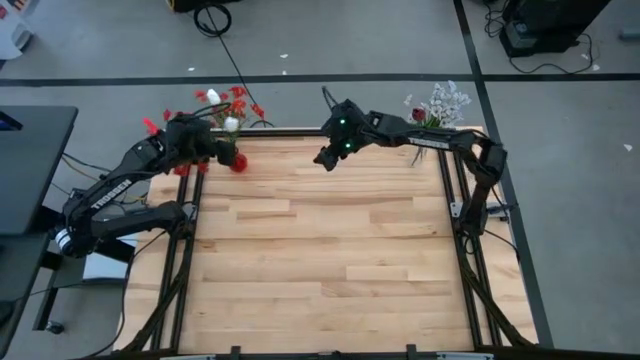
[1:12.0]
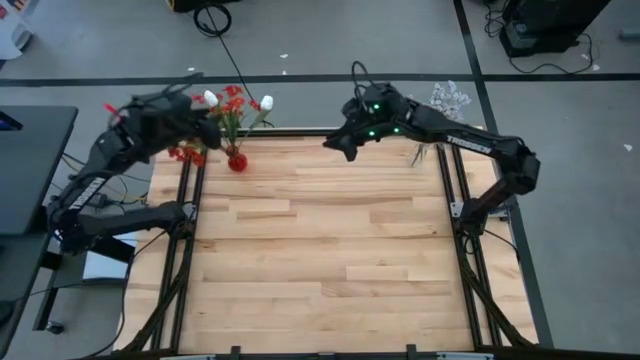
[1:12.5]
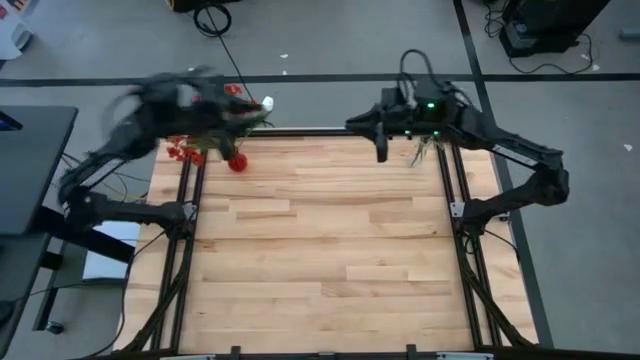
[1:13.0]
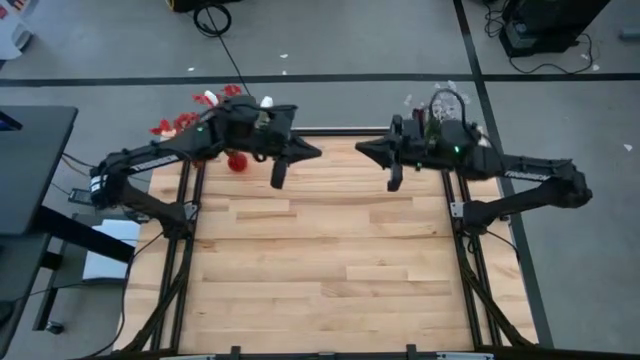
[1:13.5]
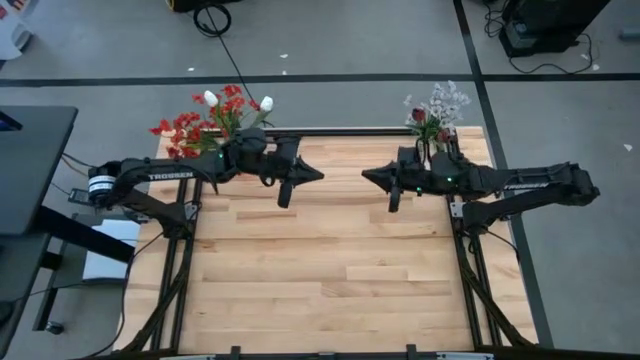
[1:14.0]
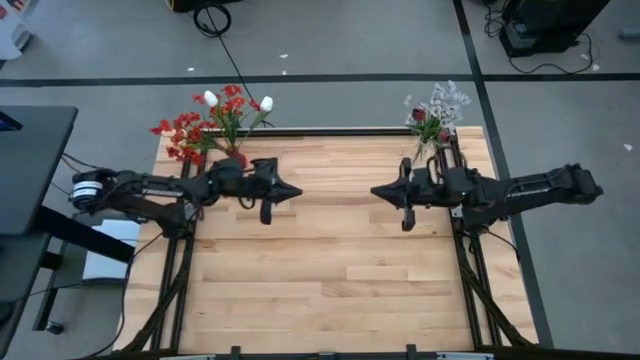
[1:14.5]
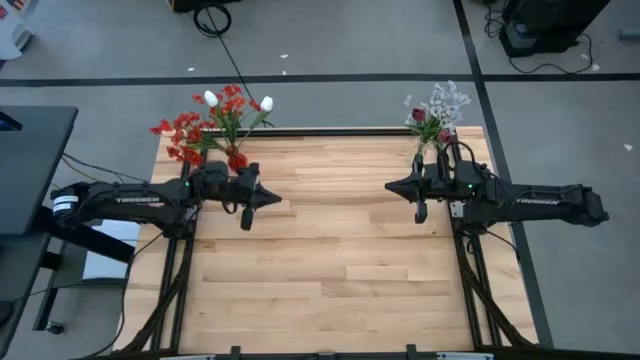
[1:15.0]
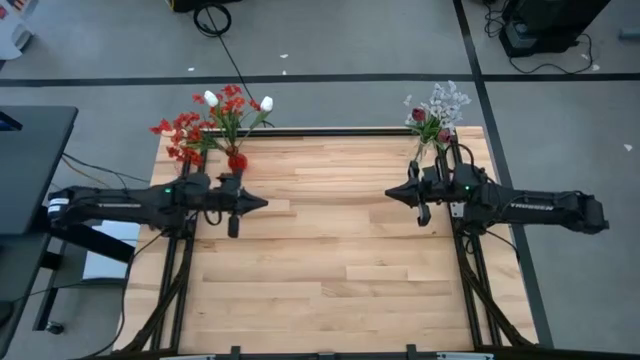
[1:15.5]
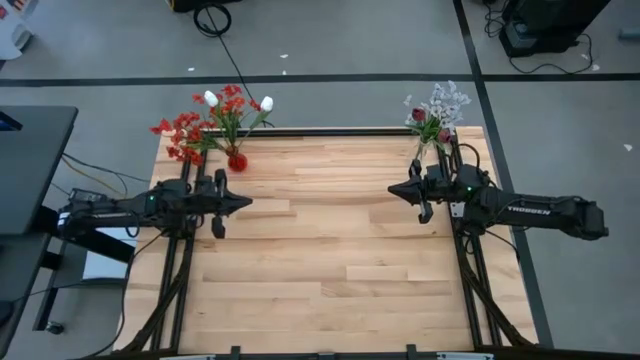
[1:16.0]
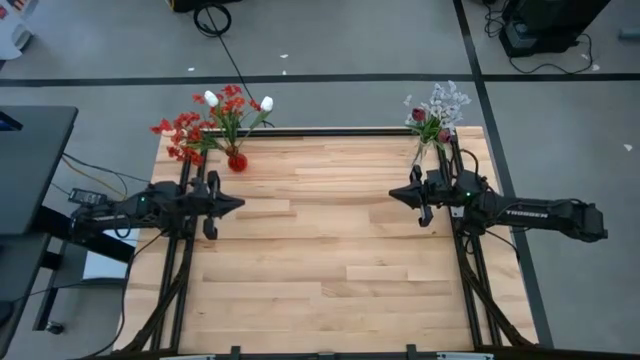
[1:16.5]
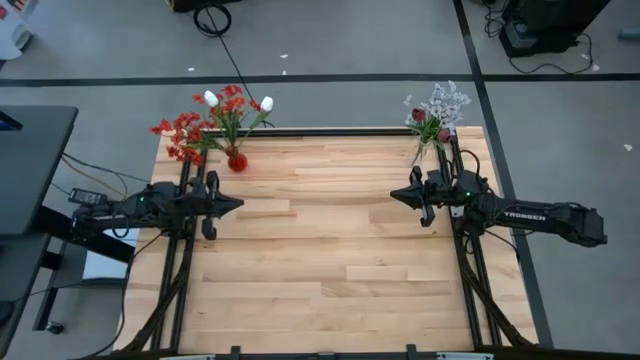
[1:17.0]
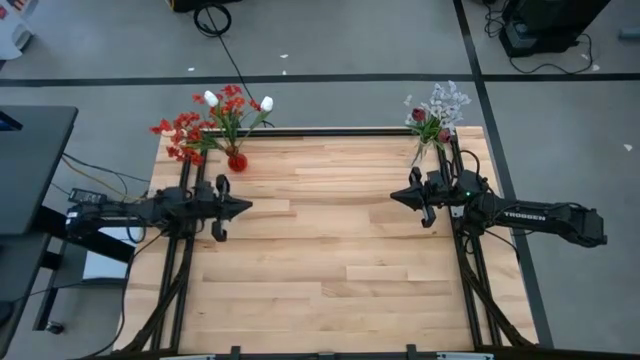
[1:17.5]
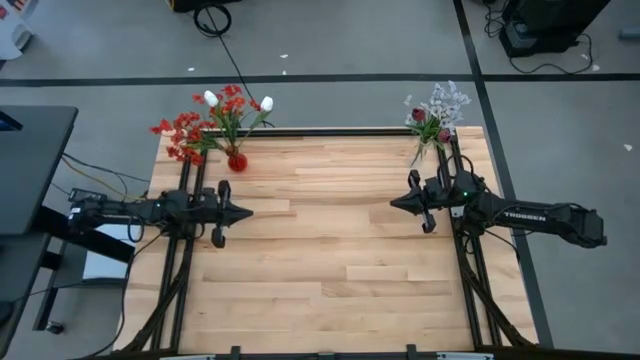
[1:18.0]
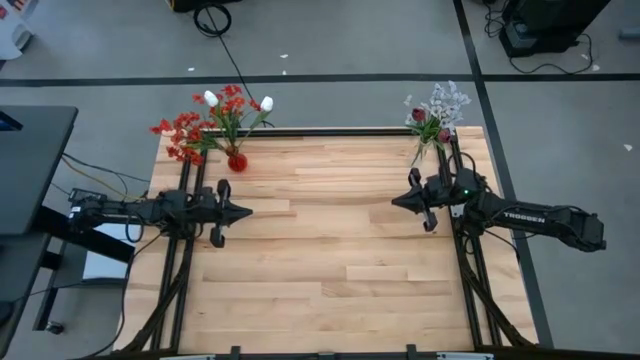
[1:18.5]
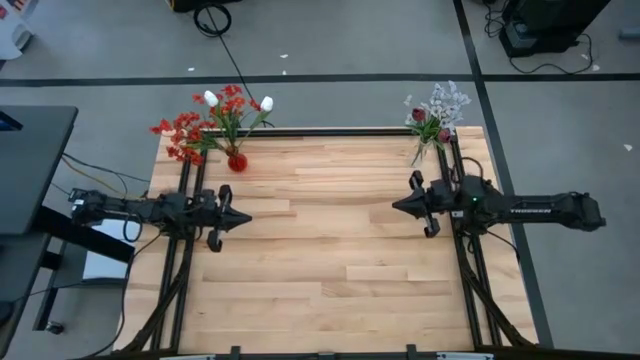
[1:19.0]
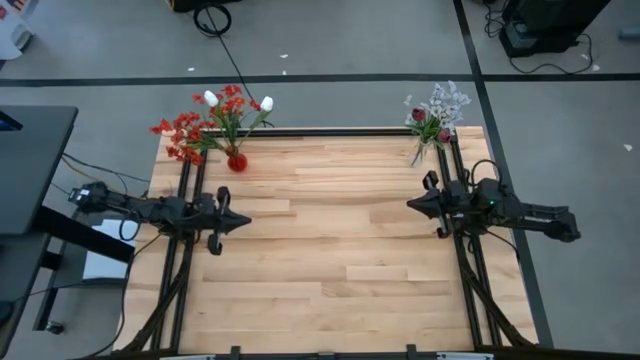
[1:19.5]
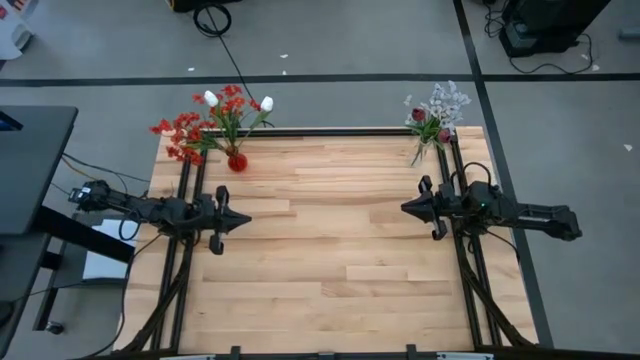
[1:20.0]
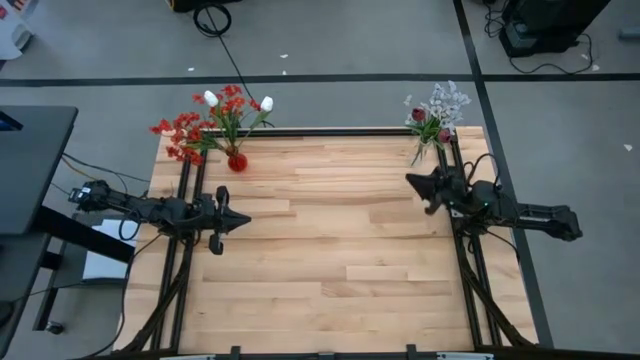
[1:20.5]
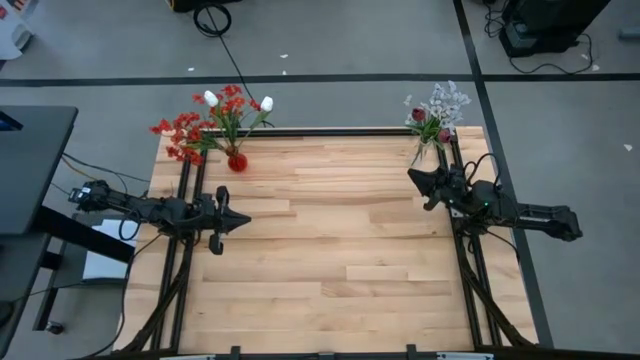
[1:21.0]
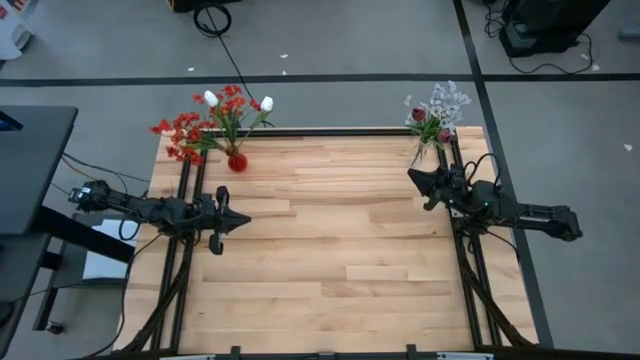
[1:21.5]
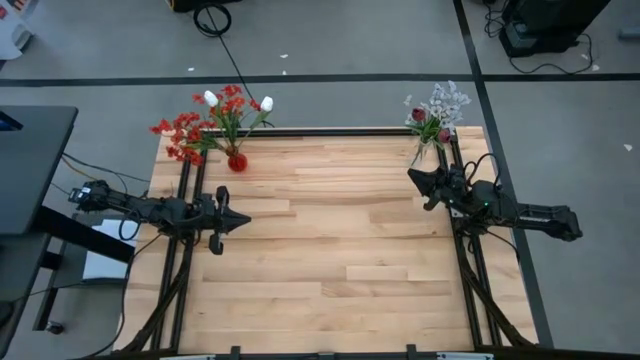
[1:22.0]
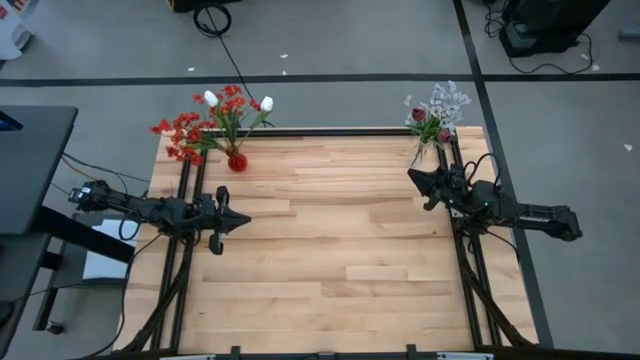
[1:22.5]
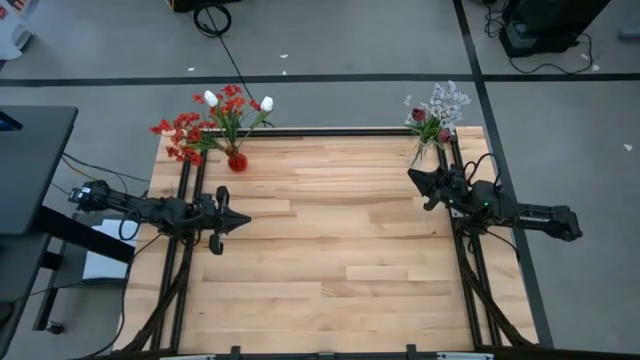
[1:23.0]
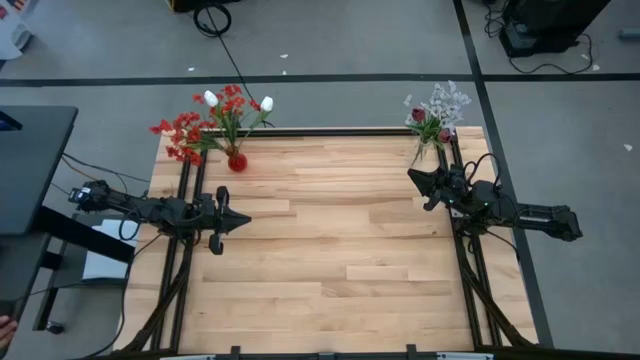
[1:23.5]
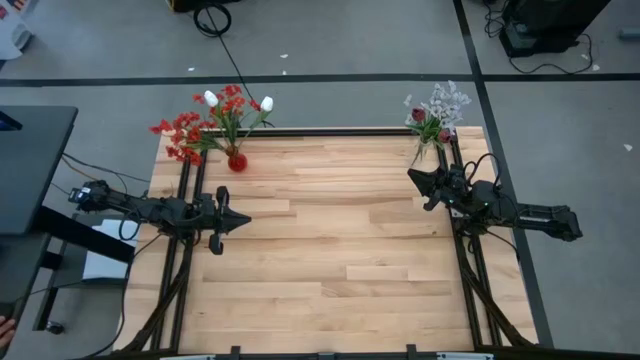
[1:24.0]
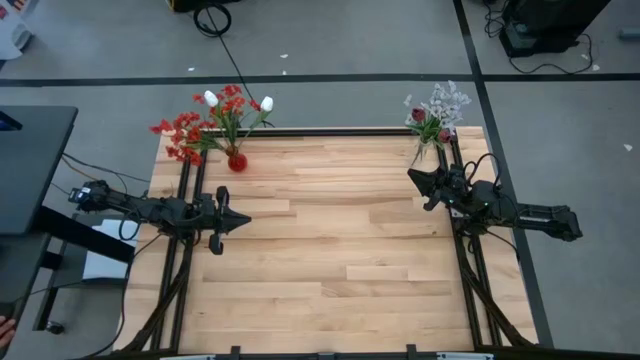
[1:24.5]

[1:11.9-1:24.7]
Task: Sort flowers into vase by color
Return to Home Position

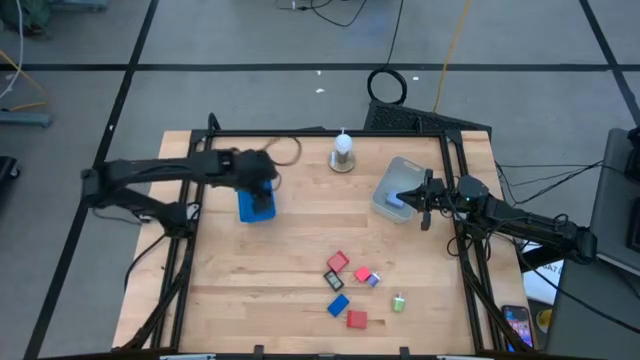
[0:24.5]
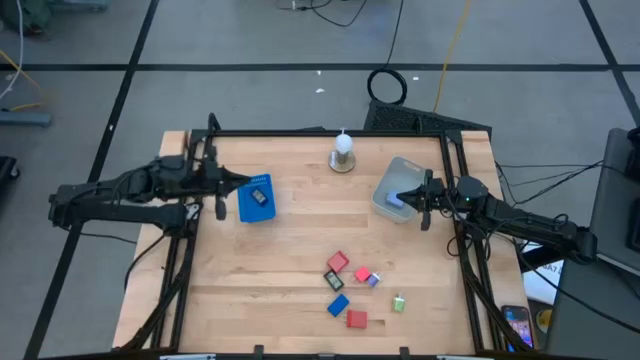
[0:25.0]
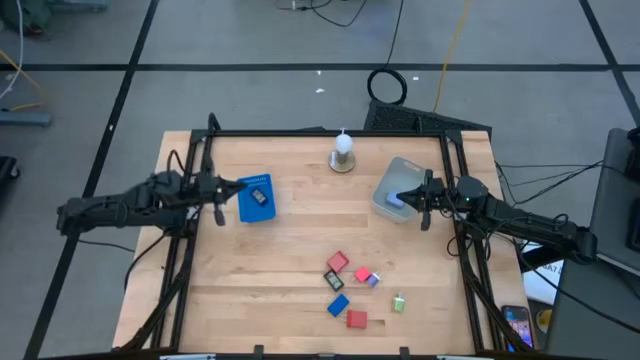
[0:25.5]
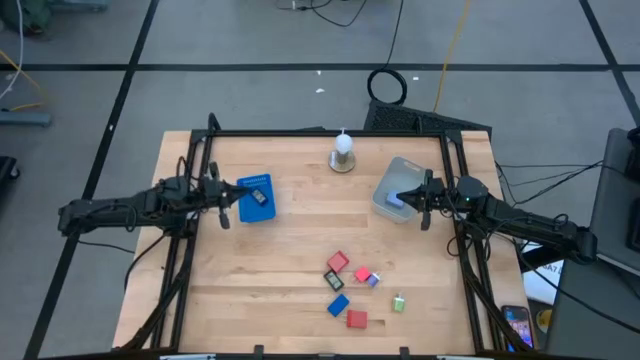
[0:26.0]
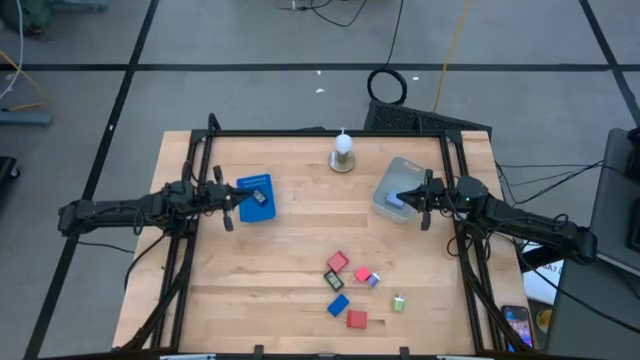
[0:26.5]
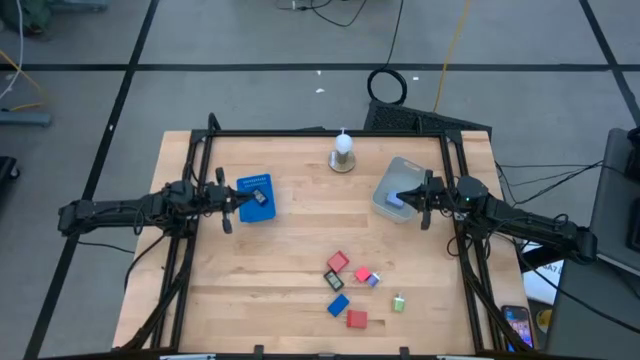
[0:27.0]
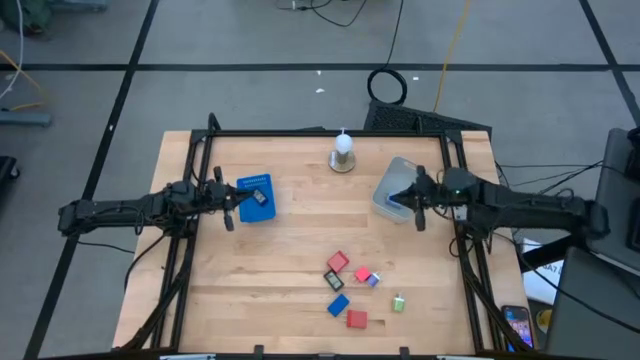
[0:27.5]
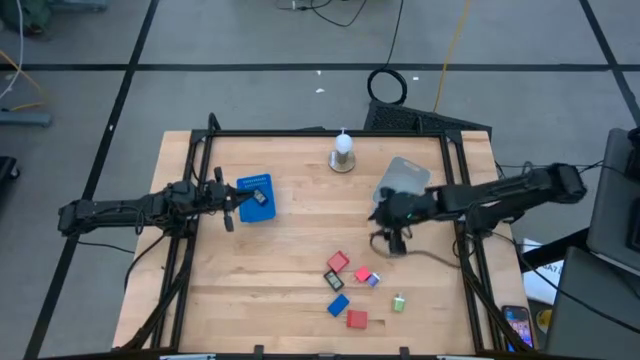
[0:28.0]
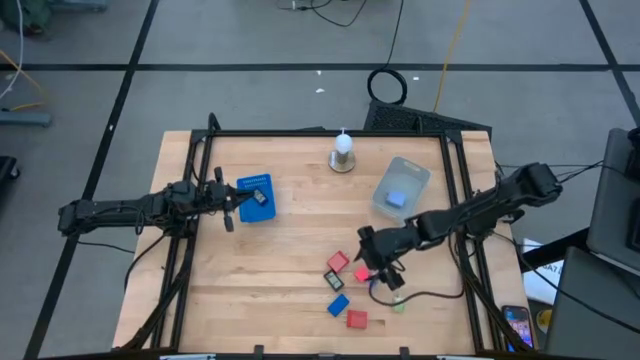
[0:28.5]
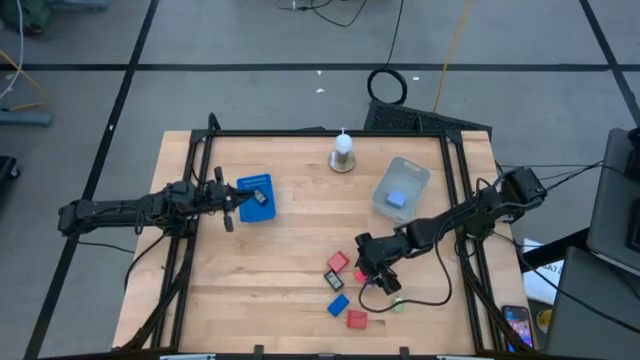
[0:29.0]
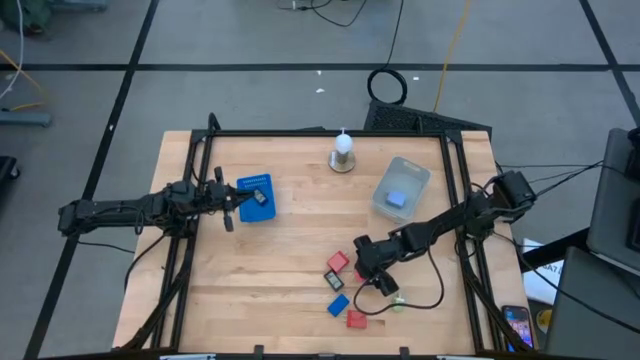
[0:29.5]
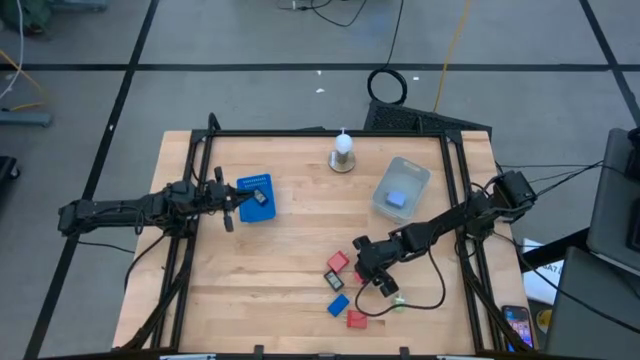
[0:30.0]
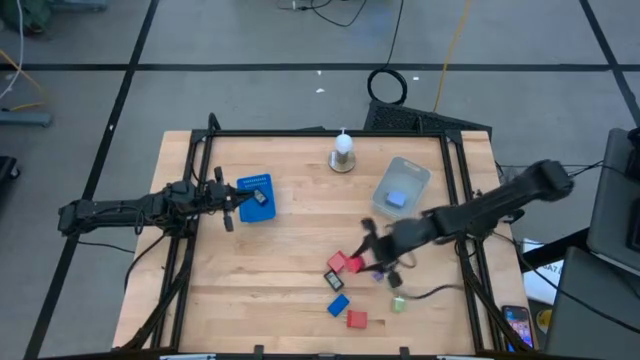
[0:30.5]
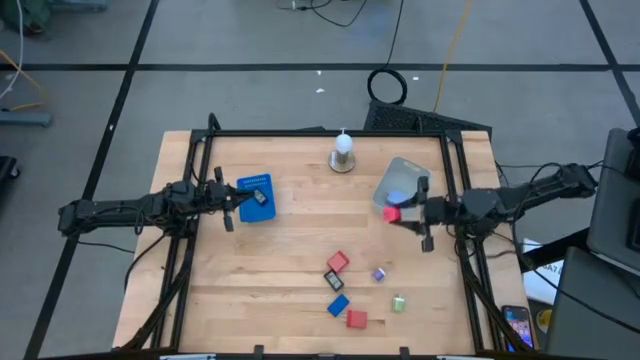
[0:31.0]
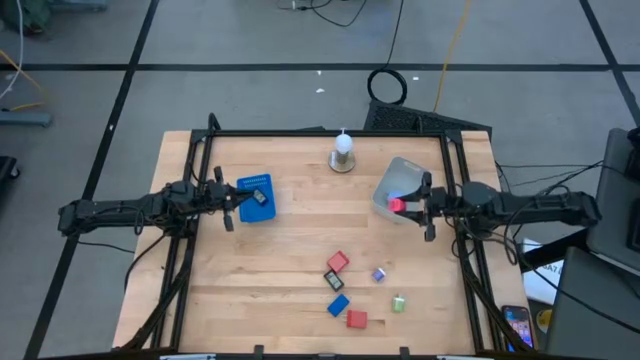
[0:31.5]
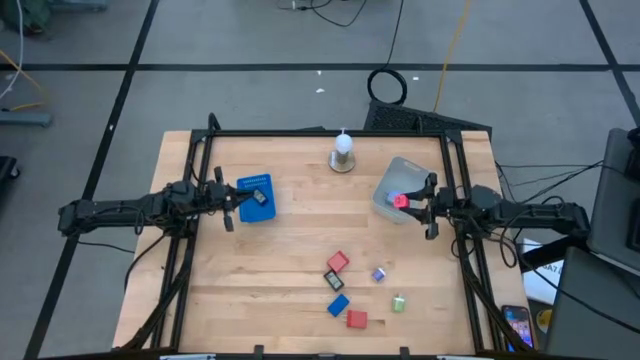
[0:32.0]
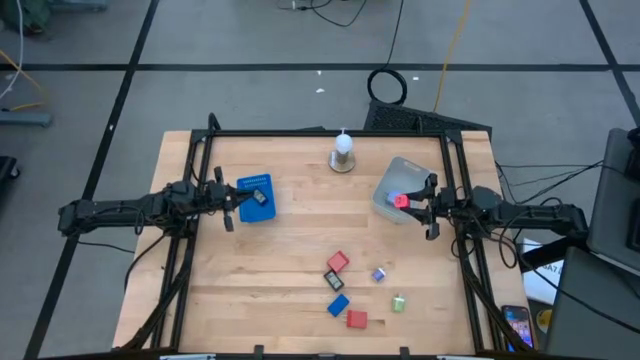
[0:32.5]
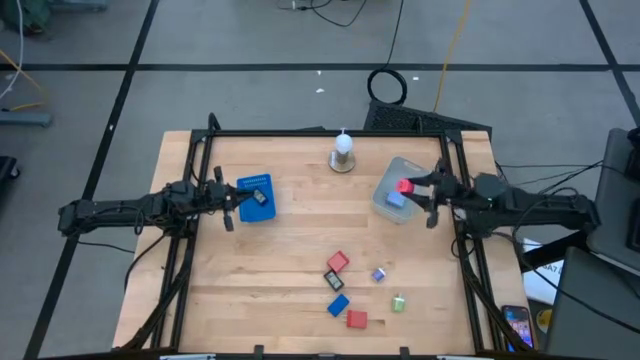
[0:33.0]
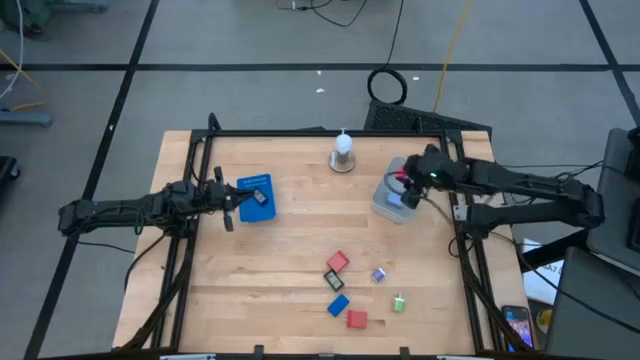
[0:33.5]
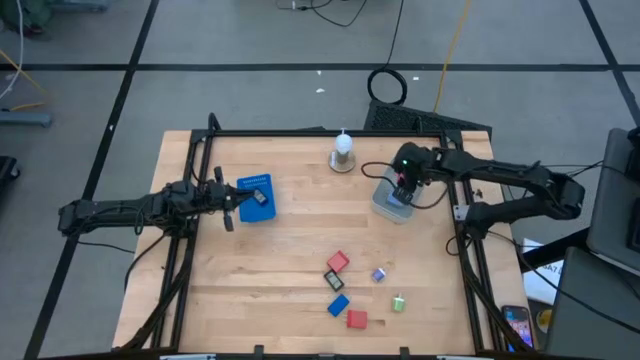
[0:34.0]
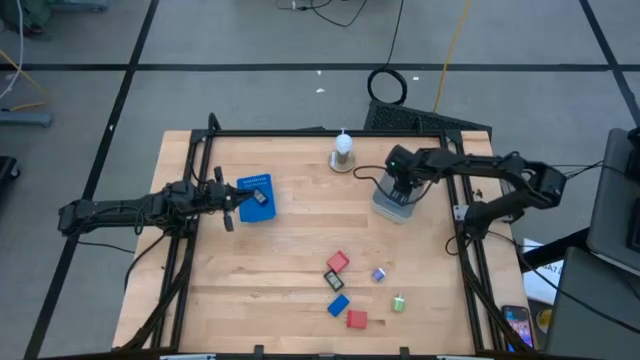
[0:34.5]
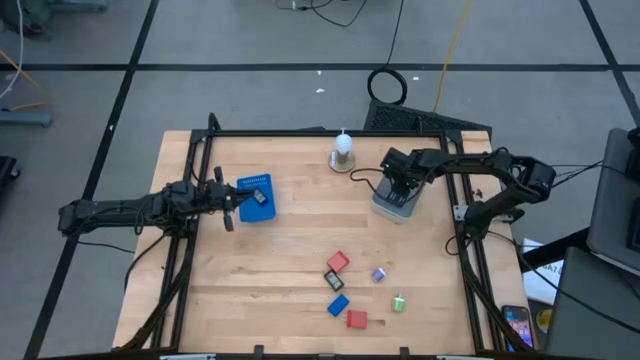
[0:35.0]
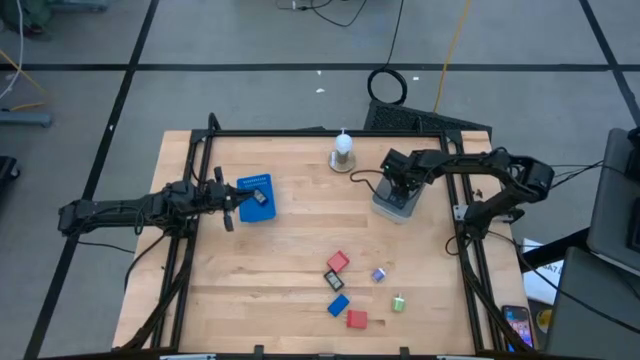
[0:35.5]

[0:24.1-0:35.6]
Task: Pick & Place Office items
Put the pink charger adapter into the gray bin
